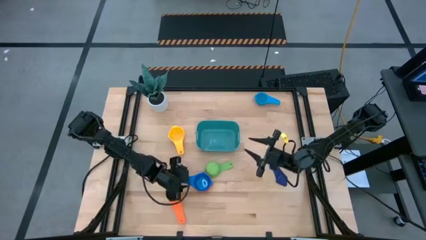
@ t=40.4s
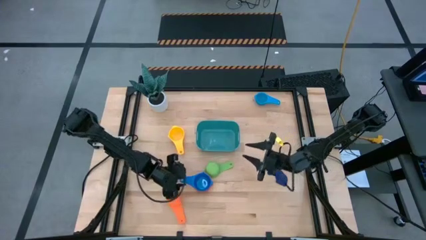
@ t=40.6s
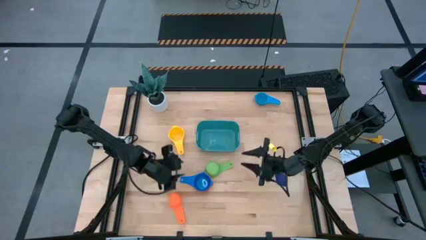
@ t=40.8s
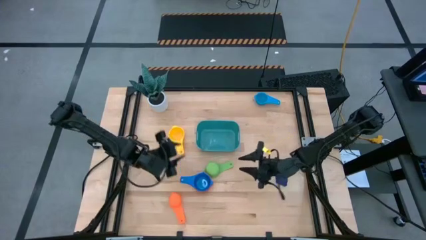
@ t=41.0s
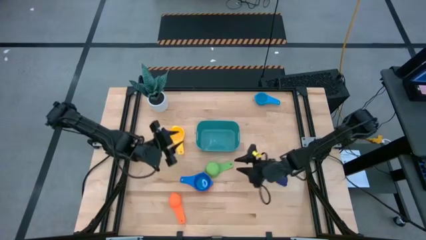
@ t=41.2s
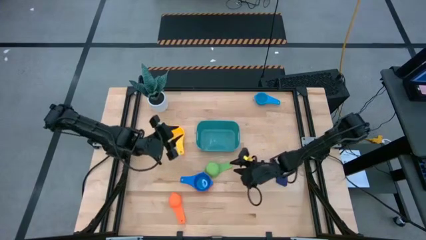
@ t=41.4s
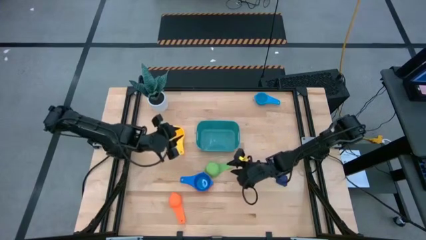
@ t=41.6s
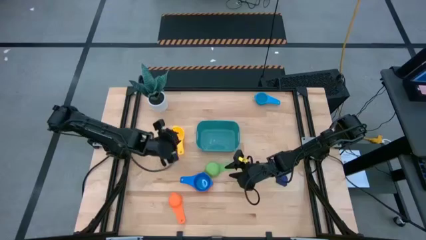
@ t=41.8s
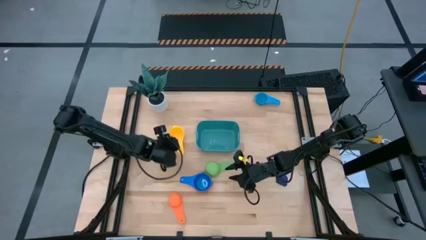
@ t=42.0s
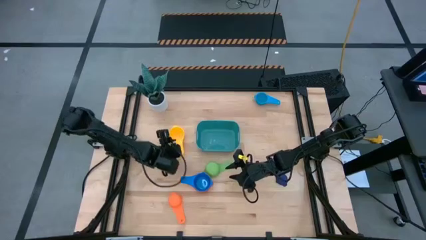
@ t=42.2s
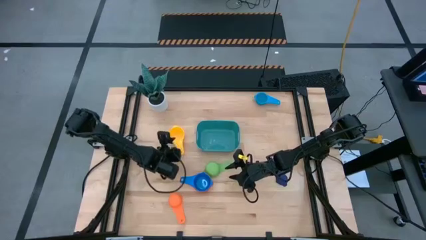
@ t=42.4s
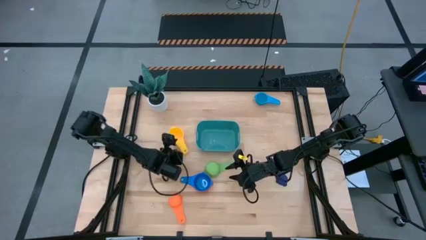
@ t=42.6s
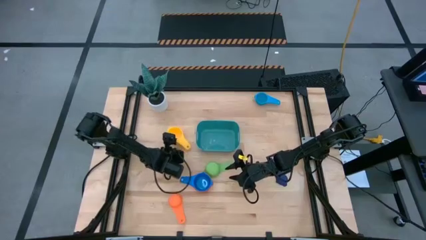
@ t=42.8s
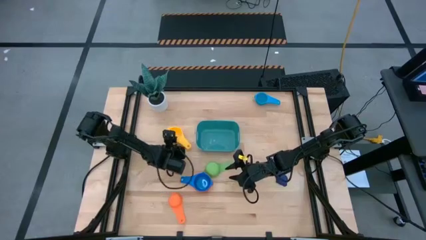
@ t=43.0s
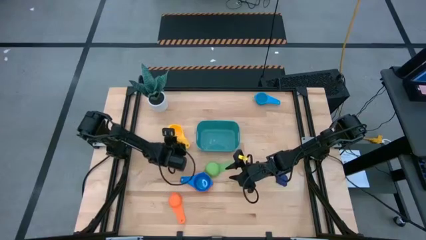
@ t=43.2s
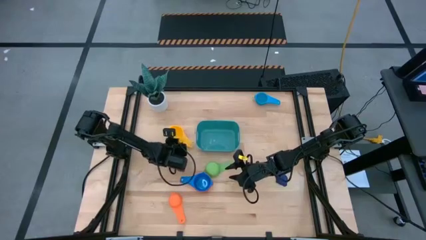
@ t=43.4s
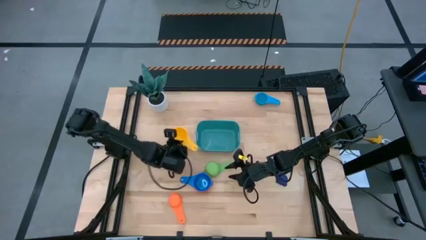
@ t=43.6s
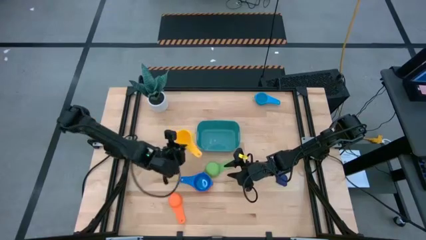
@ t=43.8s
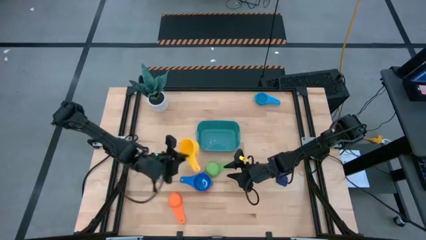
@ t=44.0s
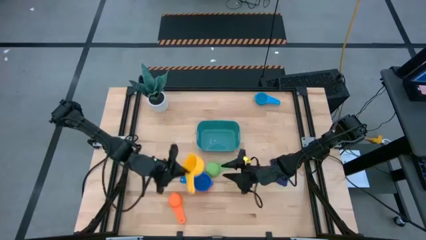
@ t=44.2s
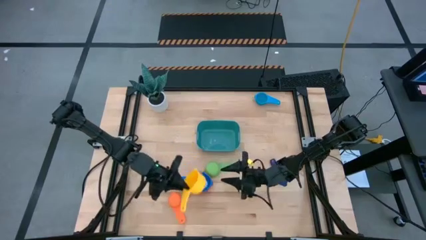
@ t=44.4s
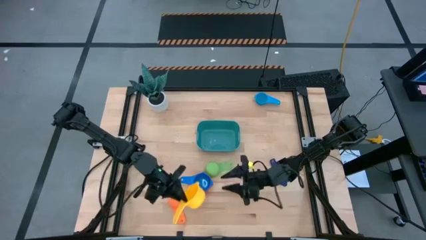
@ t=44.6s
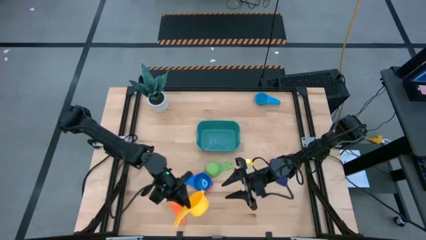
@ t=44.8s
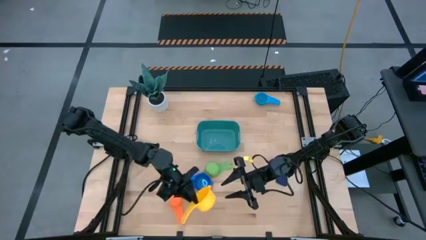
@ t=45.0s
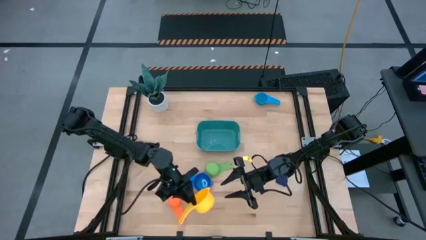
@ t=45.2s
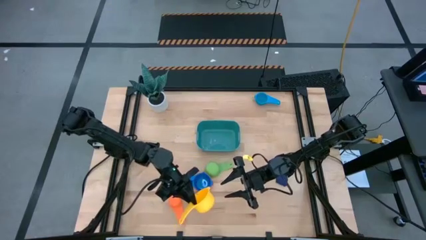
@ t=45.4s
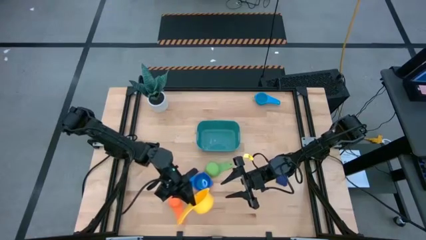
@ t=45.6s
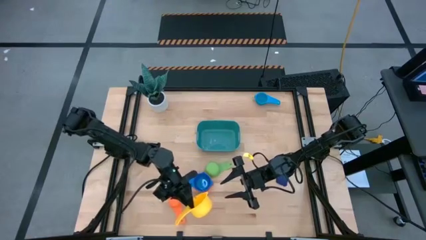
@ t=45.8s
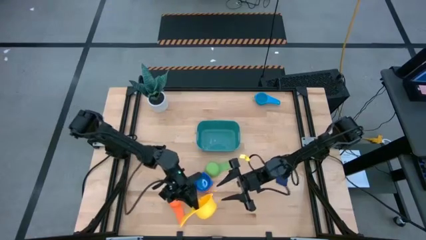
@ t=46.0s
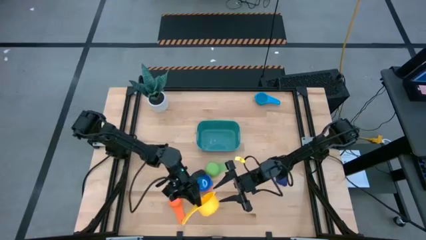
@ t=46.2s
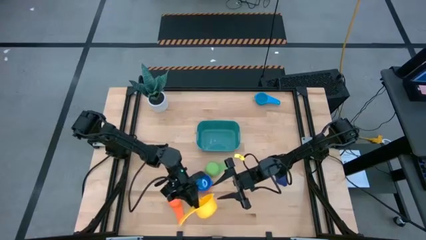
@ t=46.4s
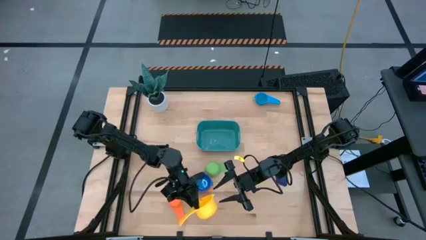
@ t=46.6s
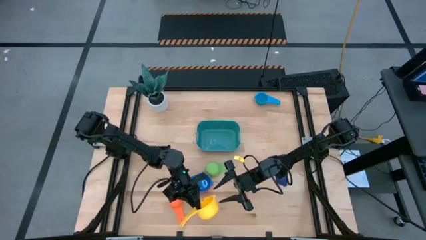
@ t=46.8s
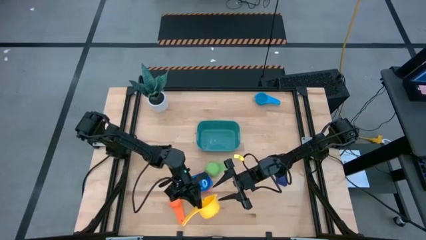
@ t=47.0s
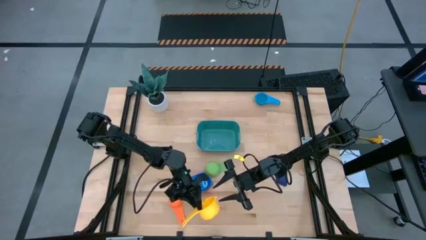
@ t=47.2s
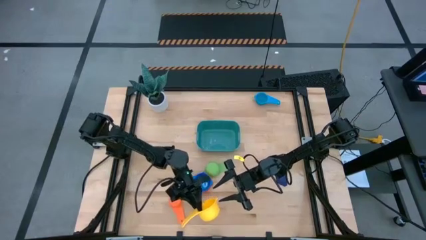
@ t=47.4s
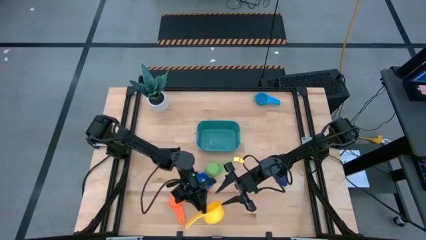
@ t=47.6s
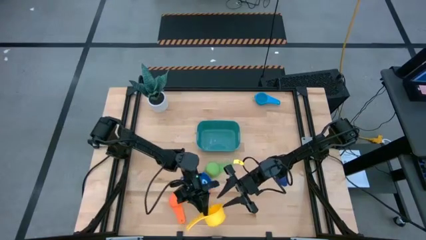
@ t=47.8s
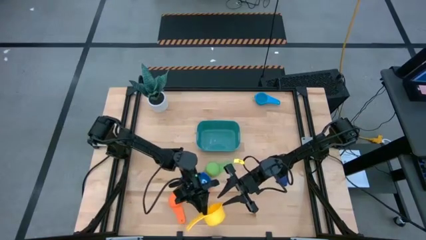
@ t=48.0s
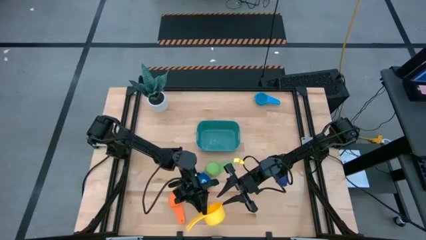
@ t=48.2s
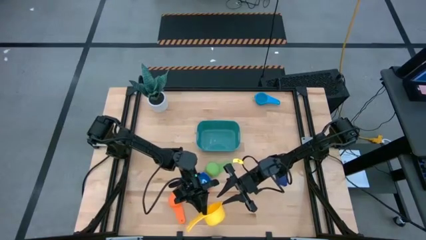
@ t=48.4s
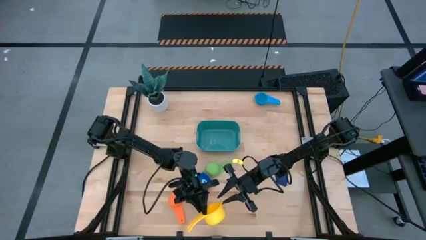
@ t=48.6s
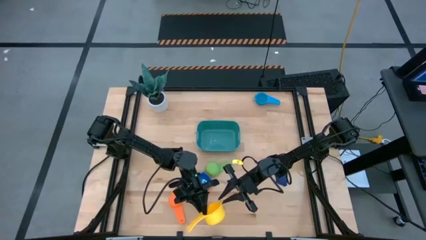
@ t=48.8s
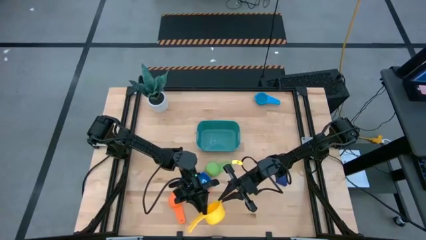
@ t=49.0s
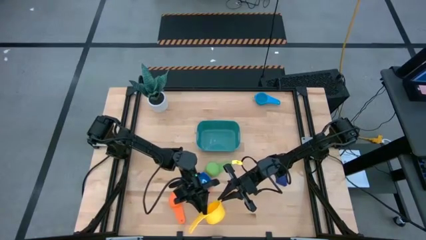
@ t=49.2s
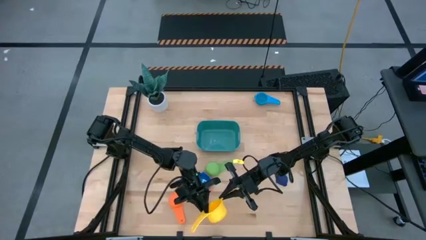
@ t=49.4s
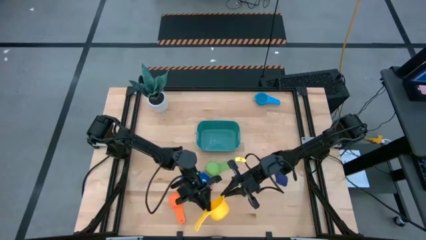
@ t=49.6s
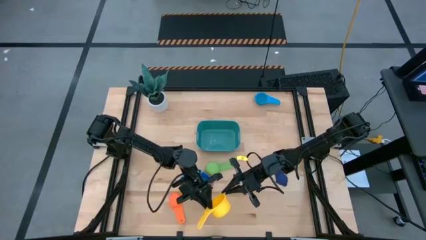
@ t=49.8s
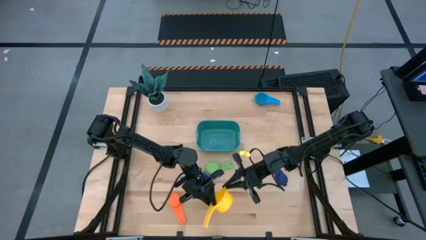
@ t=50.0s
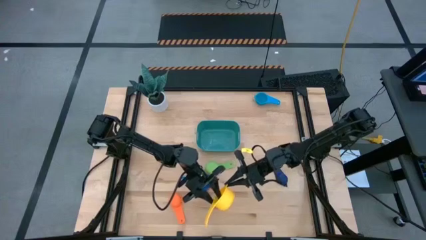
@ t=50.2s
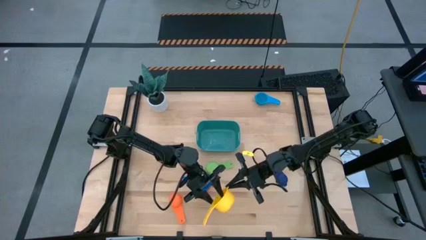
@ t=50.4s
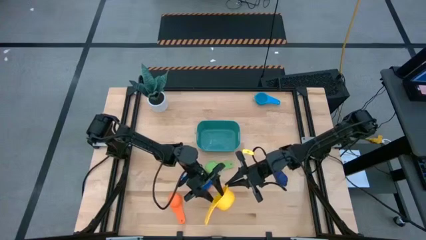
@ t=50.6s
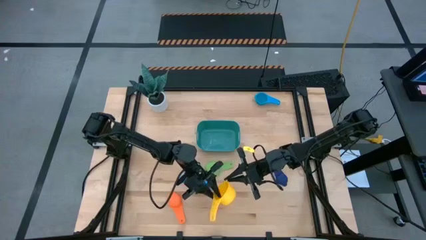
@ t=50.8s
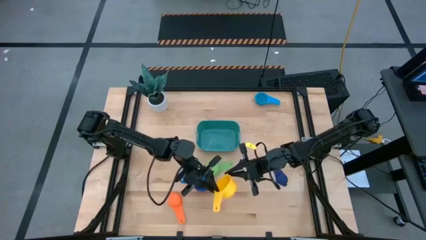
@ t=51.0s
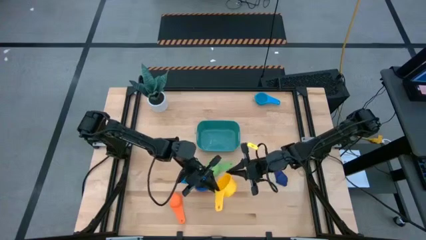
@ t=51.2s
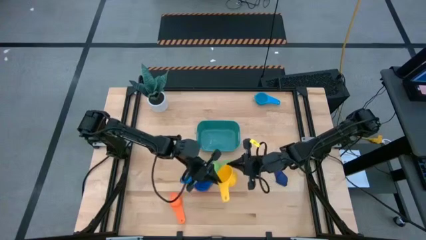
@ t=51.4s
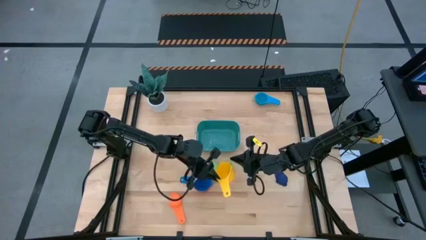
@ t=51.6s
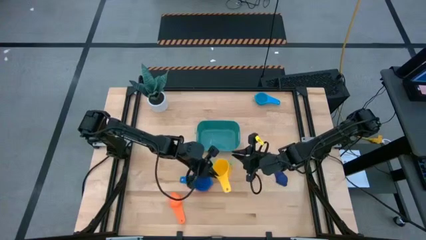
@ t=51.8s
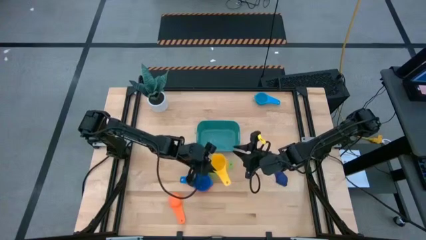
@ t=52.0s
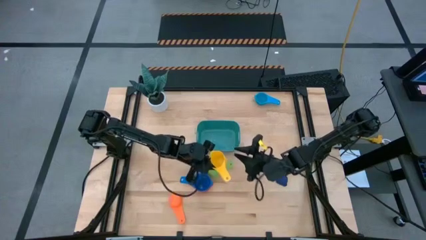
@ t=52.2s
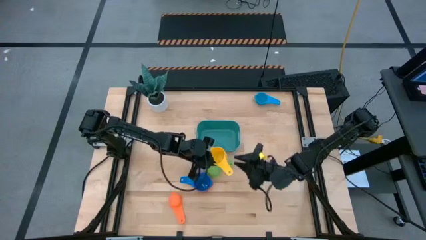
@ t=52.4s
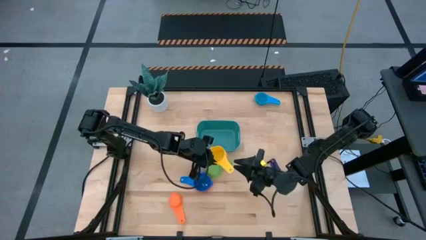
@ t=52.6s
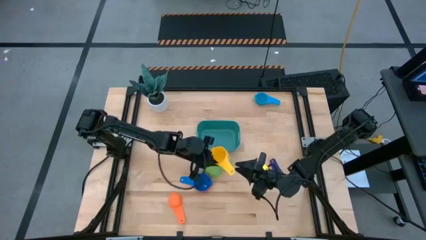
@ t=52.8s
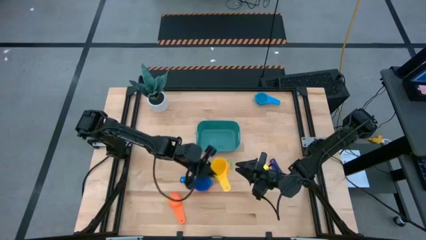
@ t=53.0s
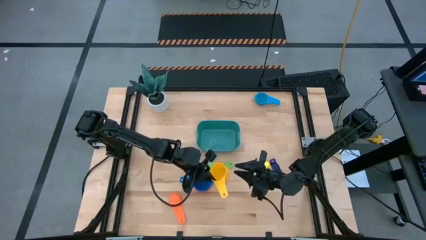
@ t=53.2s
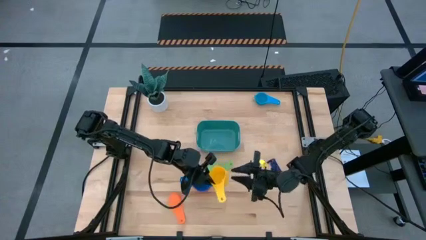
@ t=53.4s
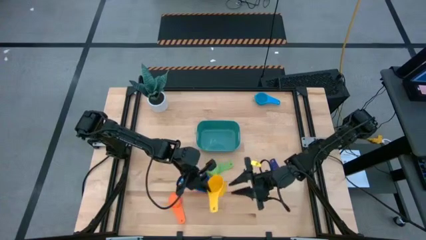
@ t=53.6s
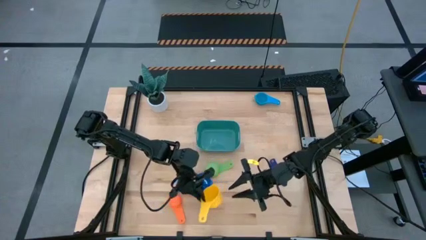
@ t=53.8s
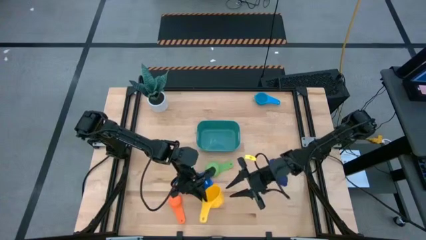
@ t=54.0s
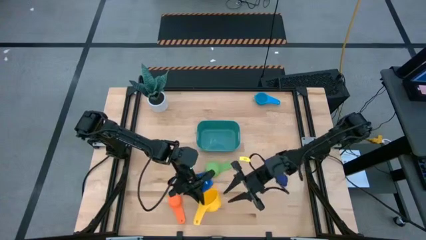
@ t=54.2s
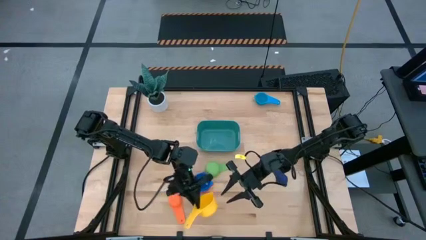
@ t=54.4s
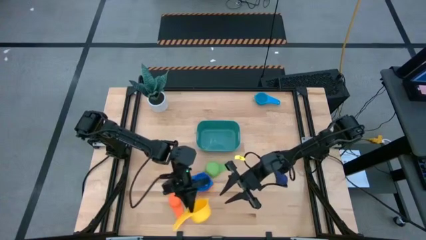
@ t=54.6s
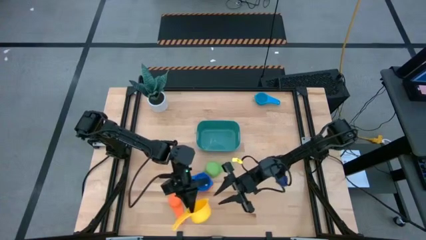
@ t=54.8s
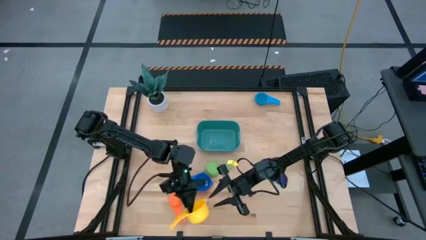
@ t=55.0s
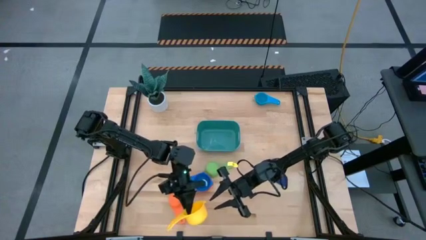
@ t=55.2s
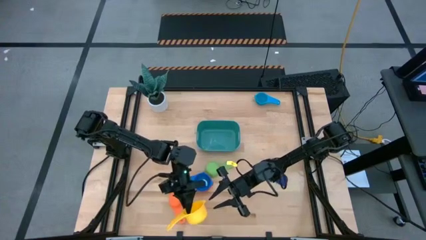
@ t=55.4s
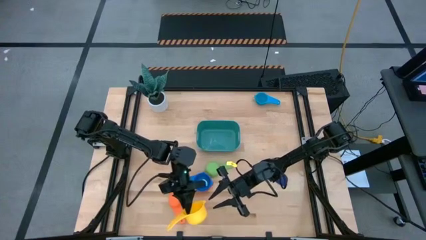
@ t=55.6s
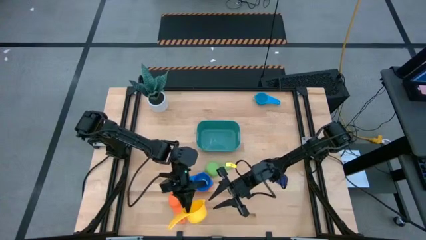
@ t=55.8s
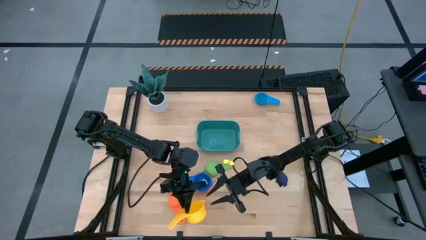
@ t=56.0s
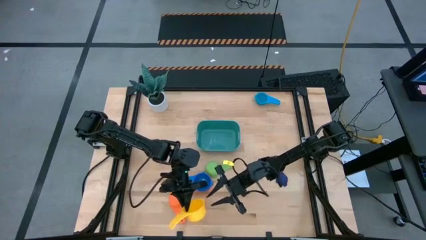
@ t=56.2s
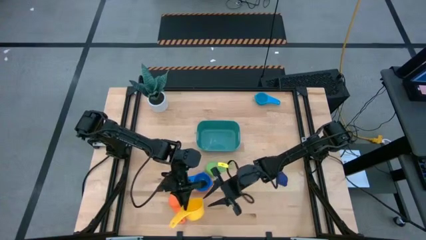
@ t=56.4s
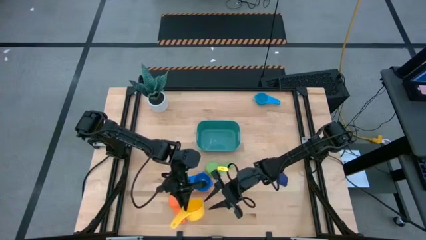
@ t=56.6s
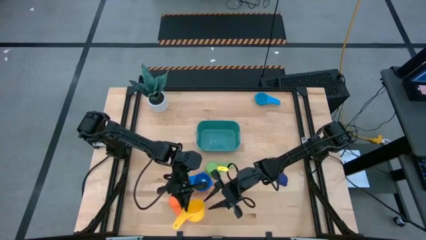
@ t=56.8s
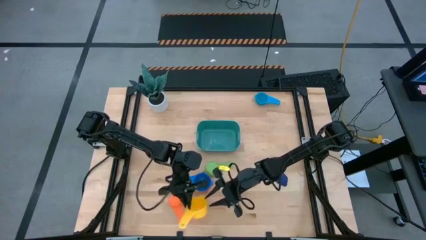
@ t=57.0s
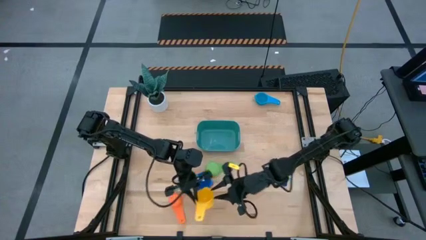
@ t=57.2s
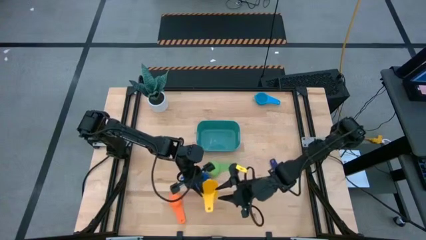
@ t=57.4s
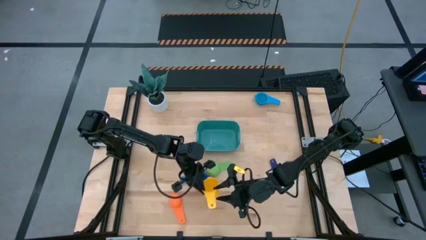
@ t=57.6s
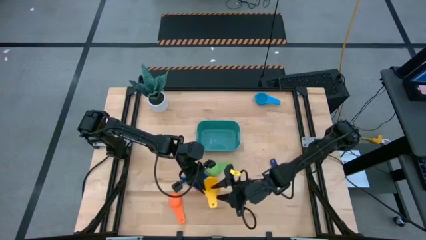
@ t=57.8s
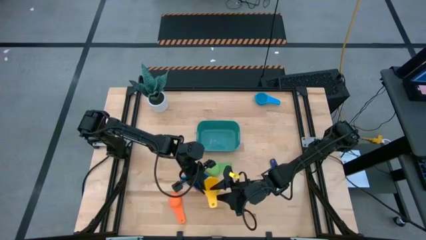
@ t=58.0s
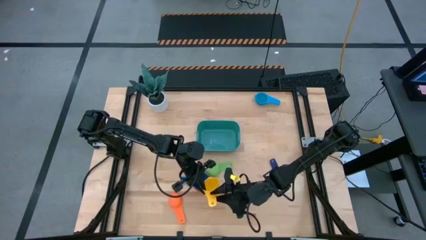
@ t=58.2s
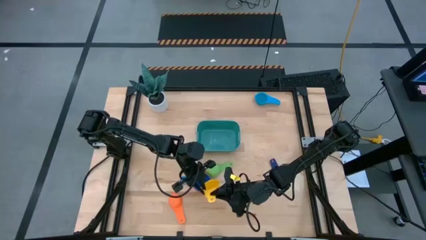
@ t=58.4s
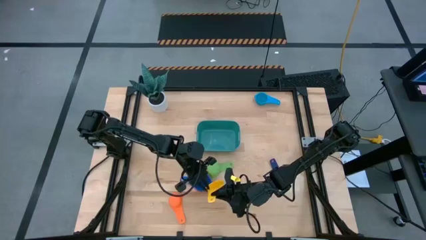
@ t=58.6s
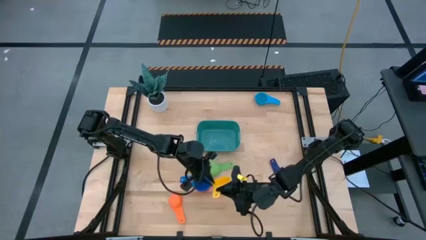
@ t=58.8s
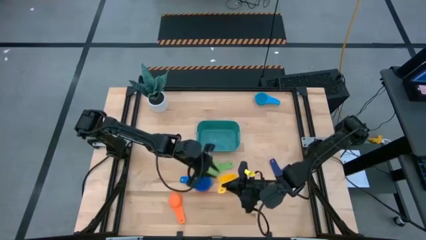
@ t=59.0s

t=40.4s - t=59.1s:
Task: Nest measuring cups in basket
Stack the yellow measuring cup on top of the blue measuring cup
